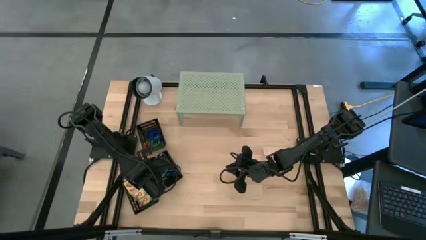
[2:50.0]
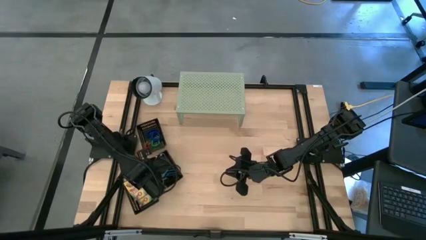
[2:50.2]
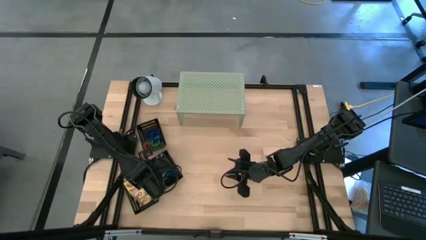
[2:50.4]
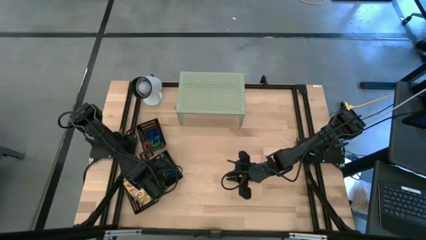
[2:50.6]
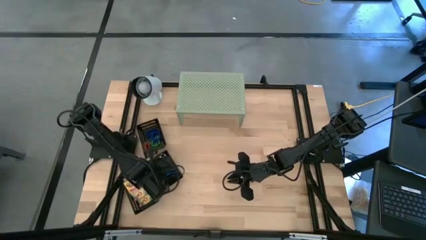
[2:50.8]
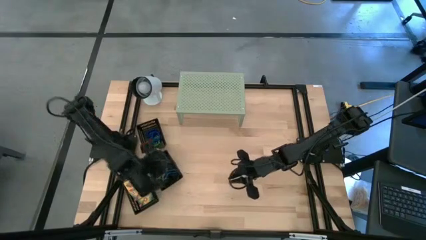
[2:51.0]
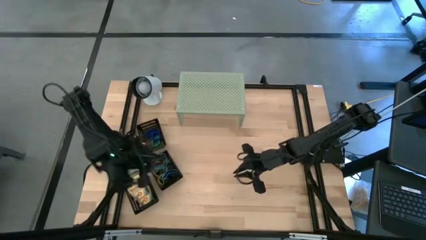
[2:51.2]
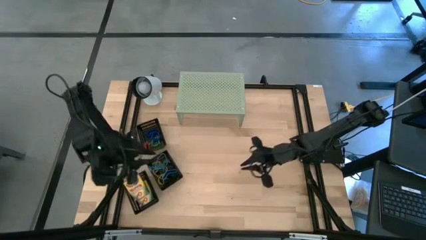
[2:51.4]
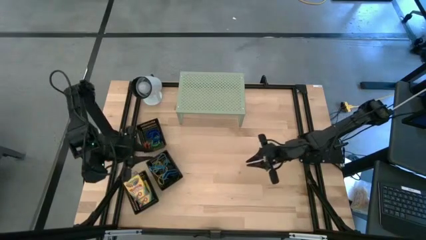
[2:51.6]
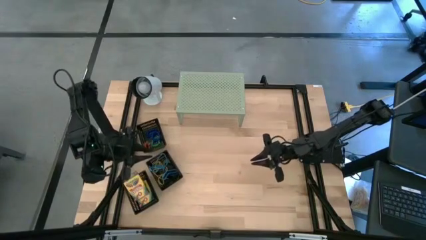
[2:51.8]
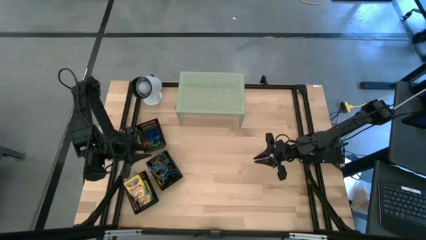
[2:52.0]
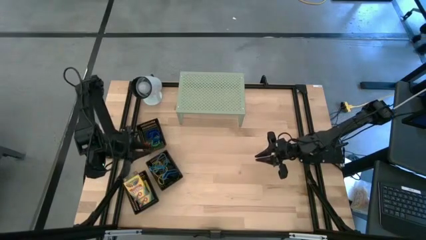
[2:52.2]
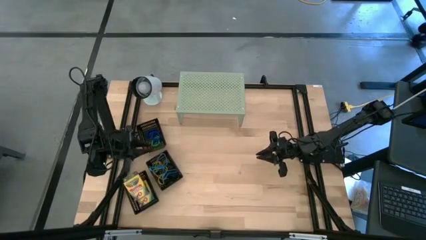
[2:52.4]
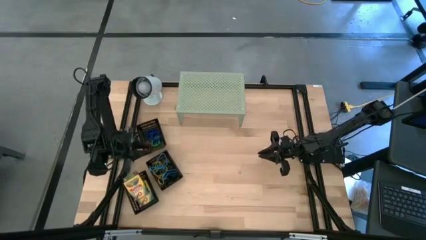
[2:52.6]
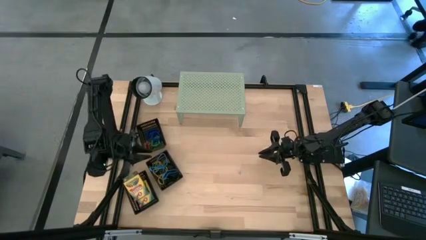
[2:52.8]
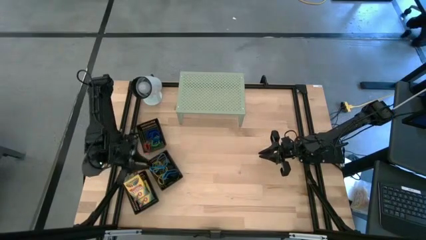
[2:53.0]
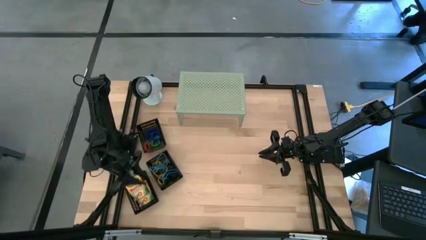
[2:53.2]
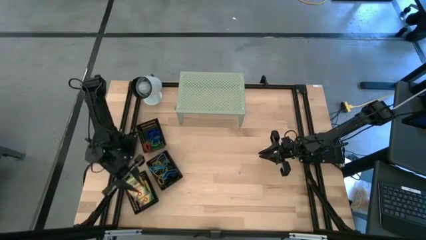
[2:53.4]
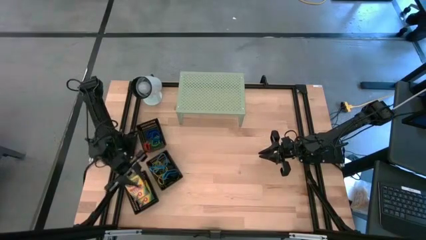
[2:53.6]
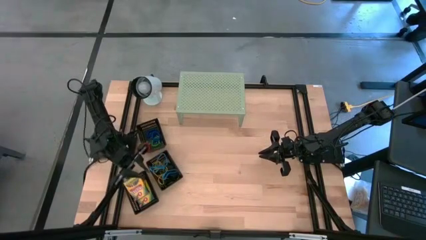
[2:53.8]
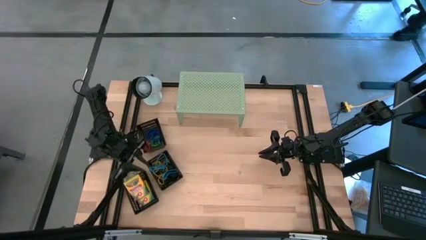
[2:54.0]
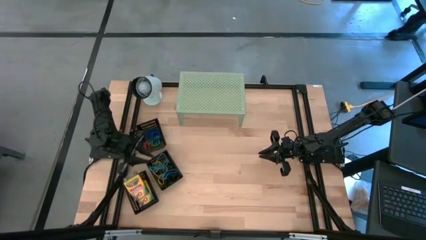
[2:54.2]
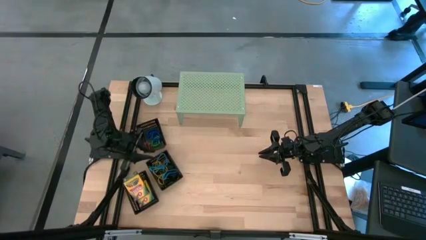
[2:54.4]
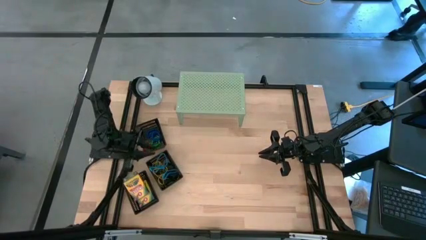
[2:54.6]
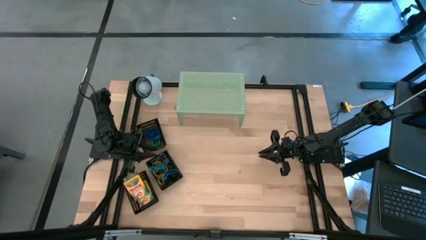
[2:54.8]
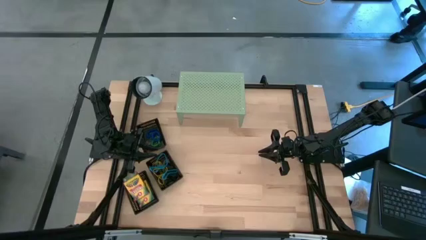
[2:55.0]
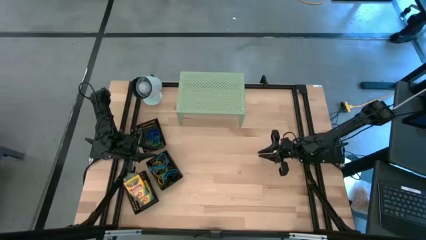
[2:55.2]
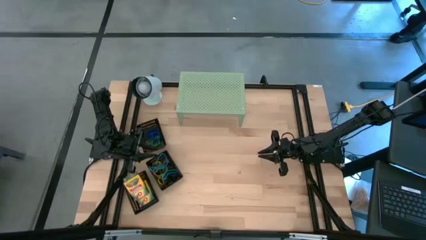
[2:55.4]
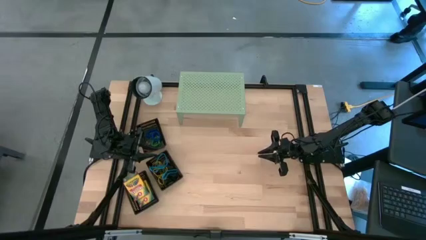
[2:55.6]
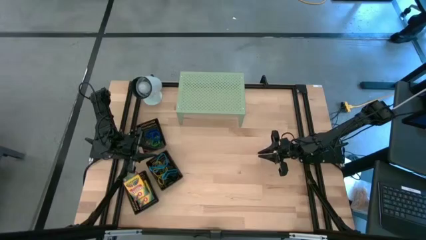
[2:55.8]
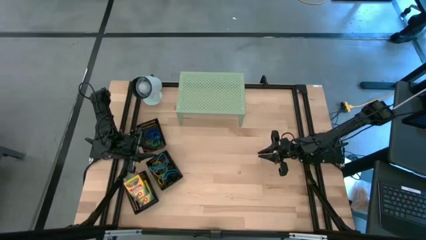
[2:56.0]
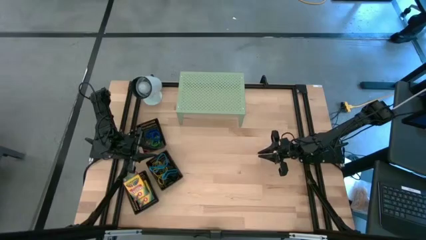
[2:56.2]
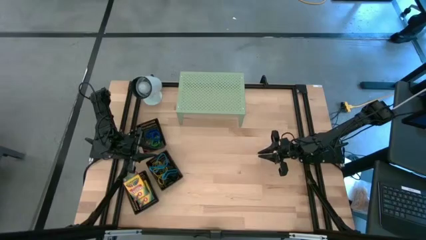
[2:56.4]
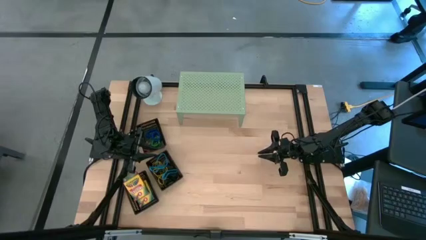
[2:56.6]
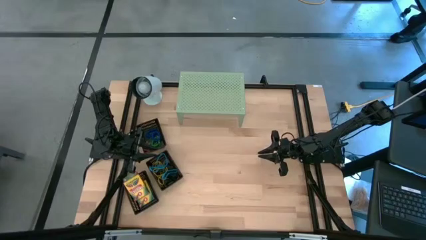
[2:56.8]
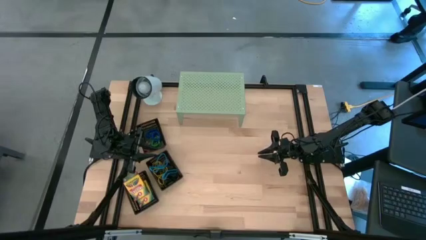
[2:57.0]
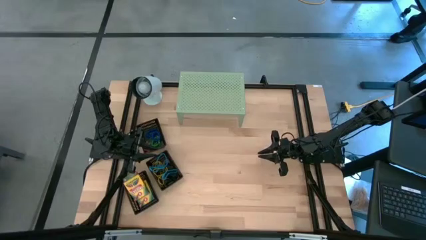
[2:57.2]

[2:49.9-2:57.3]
Task: Pick & Place Office Desk Supplies
Return to Home Position

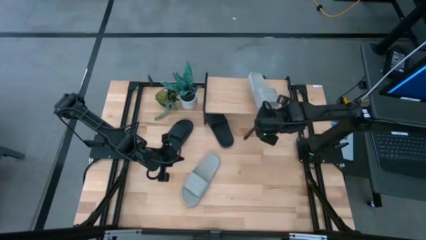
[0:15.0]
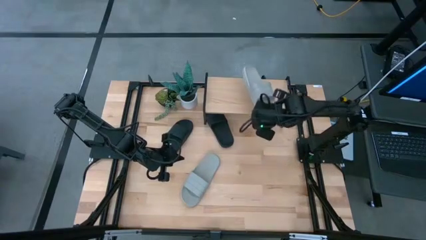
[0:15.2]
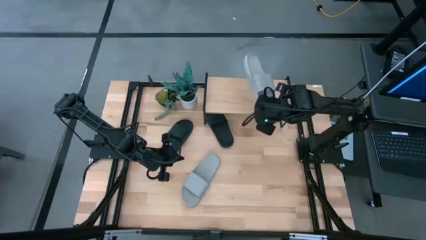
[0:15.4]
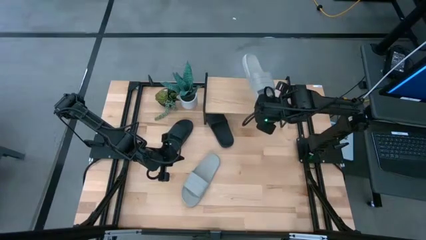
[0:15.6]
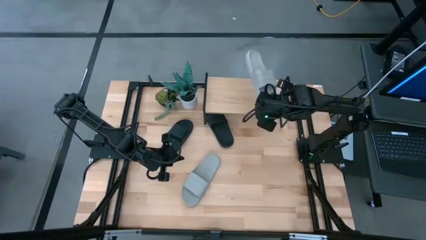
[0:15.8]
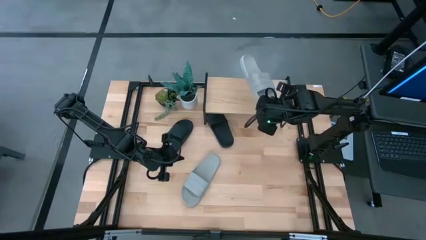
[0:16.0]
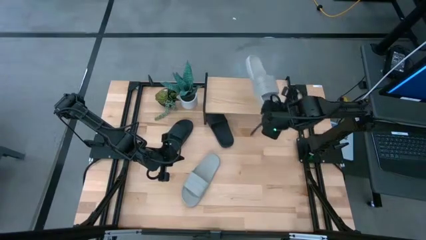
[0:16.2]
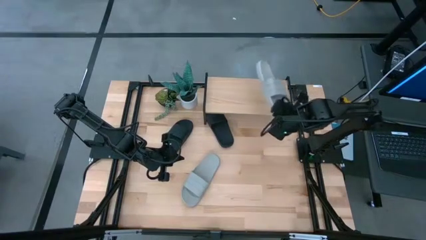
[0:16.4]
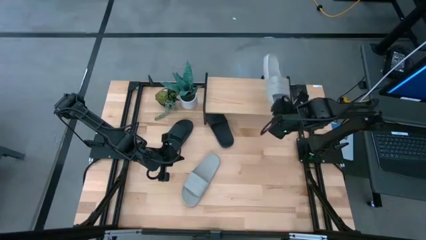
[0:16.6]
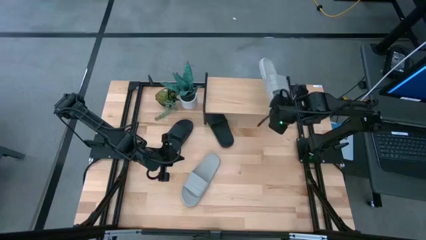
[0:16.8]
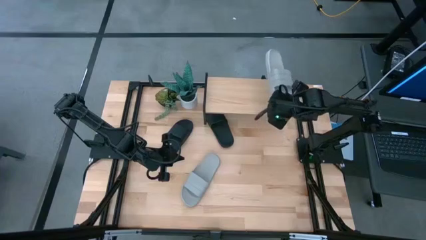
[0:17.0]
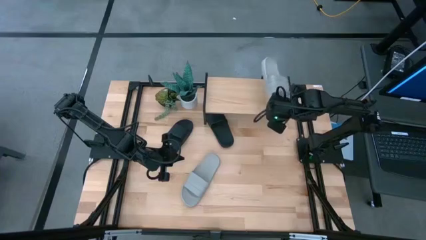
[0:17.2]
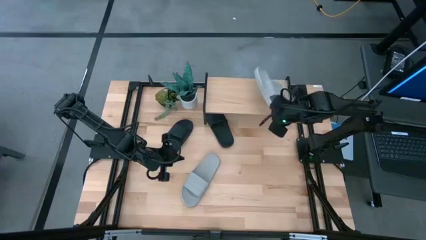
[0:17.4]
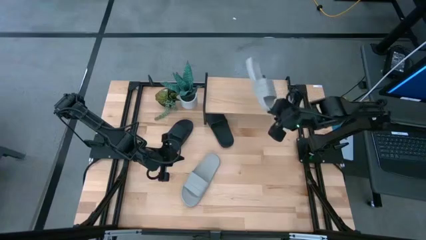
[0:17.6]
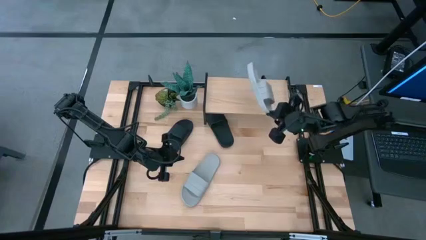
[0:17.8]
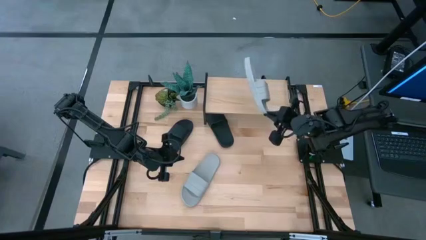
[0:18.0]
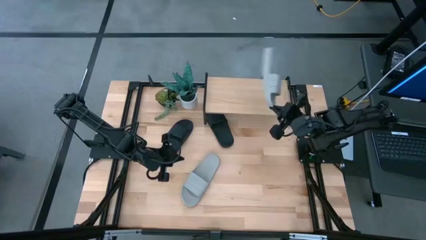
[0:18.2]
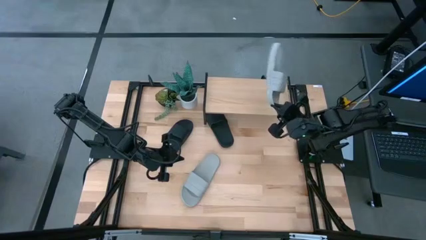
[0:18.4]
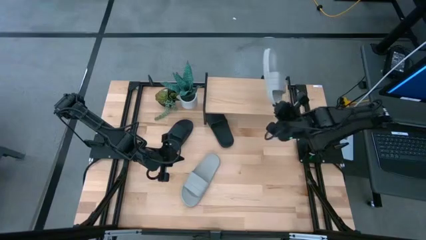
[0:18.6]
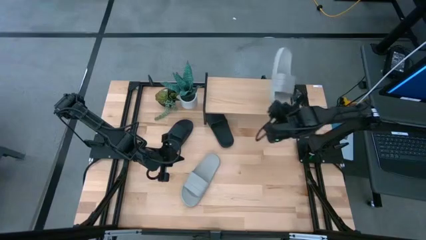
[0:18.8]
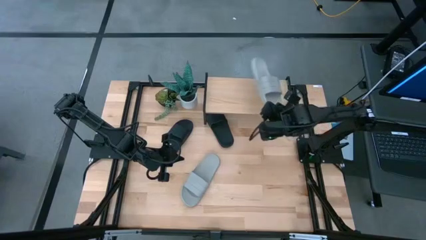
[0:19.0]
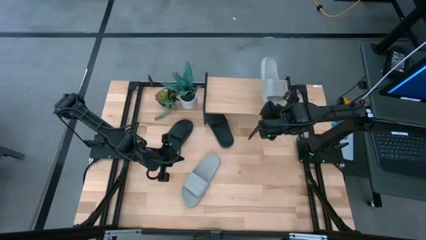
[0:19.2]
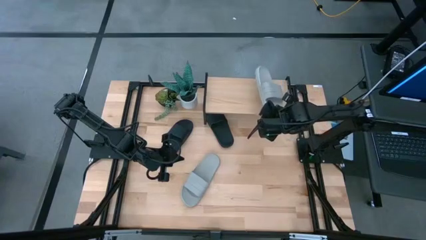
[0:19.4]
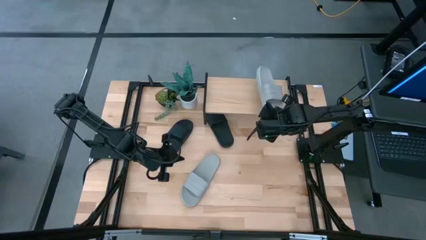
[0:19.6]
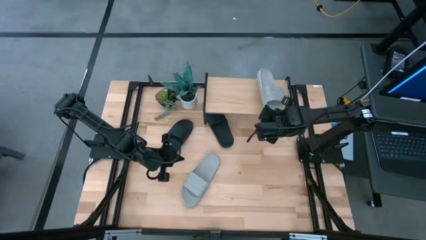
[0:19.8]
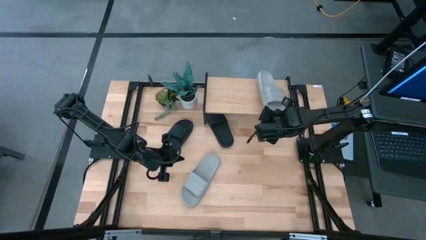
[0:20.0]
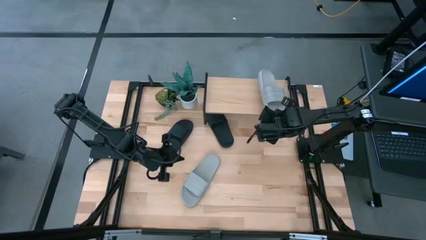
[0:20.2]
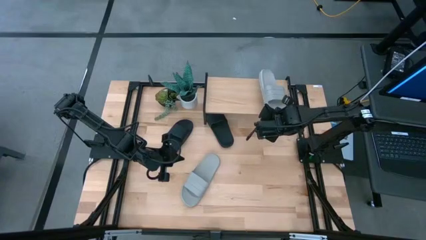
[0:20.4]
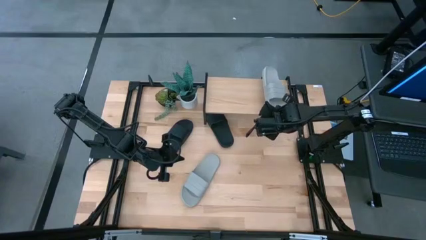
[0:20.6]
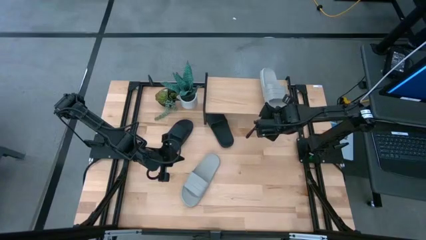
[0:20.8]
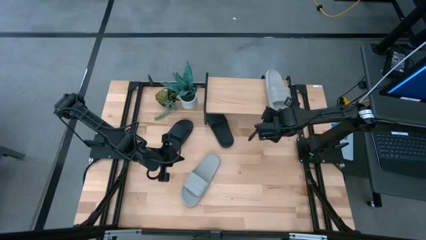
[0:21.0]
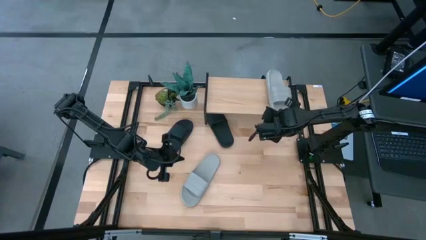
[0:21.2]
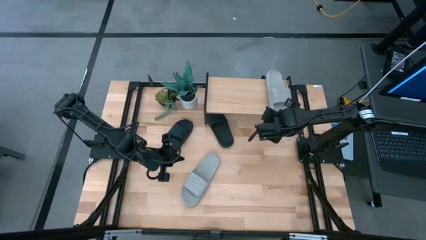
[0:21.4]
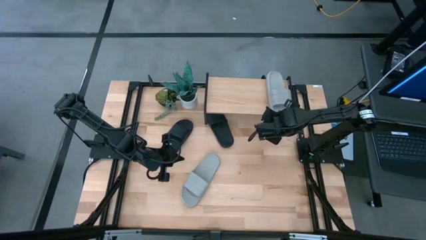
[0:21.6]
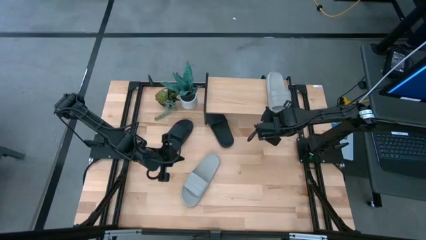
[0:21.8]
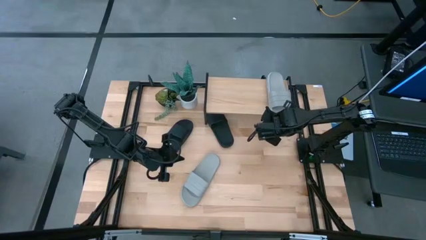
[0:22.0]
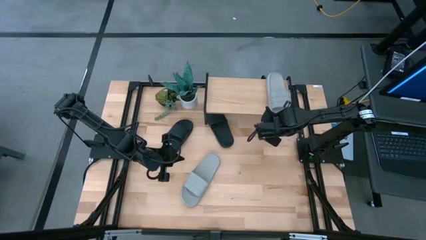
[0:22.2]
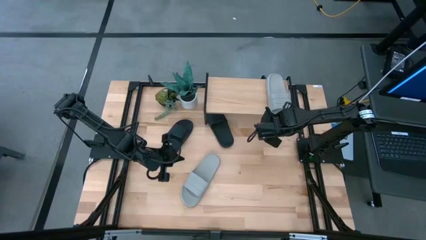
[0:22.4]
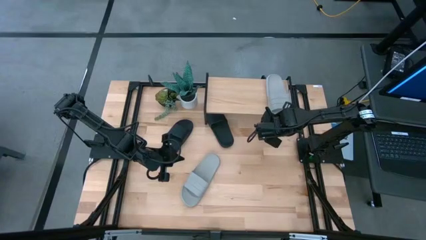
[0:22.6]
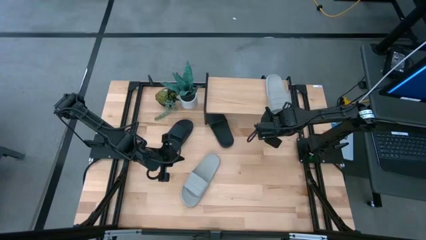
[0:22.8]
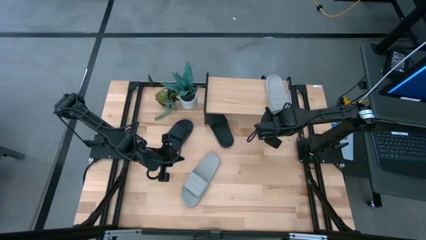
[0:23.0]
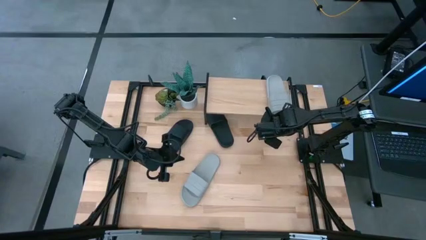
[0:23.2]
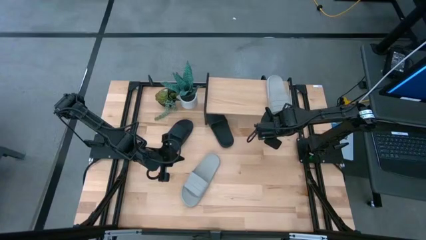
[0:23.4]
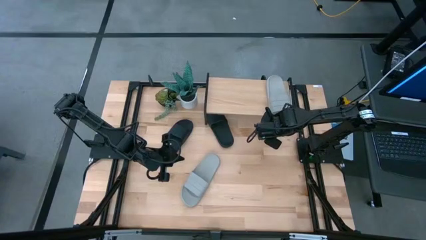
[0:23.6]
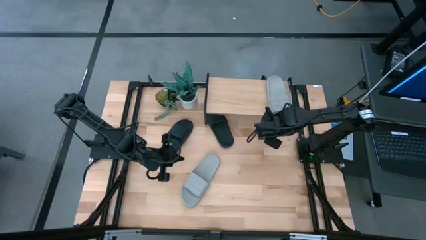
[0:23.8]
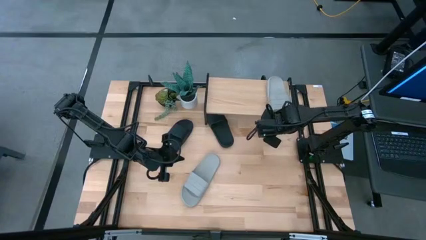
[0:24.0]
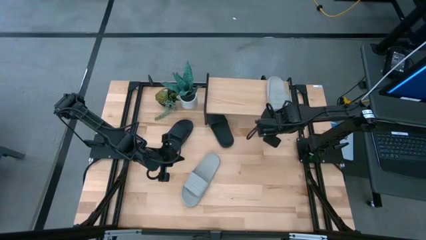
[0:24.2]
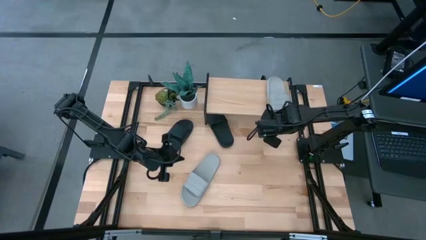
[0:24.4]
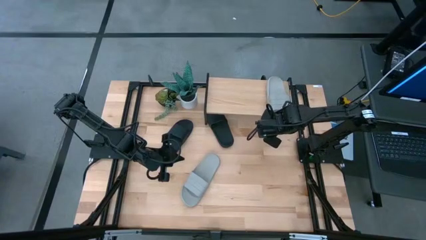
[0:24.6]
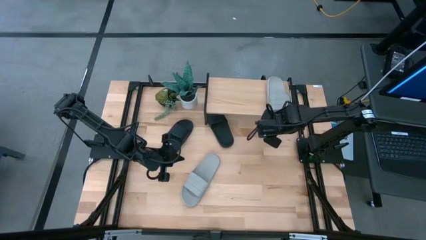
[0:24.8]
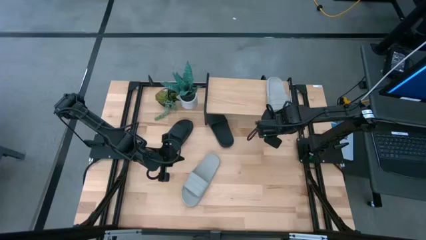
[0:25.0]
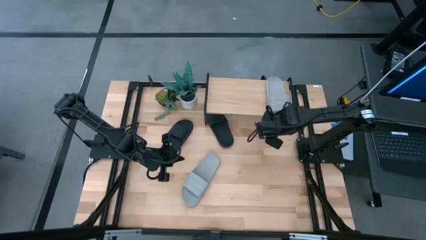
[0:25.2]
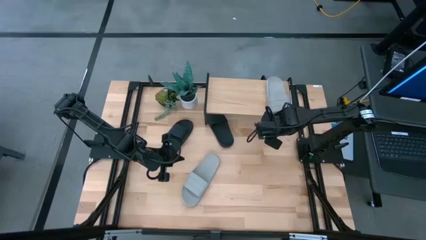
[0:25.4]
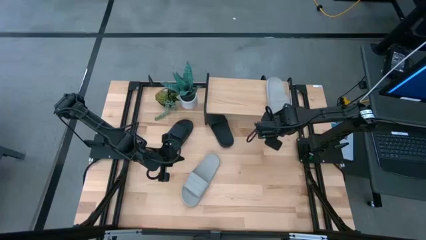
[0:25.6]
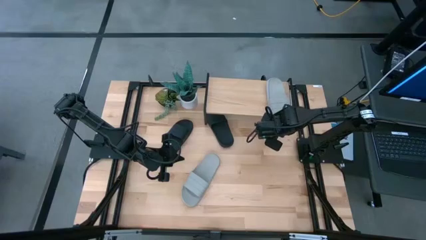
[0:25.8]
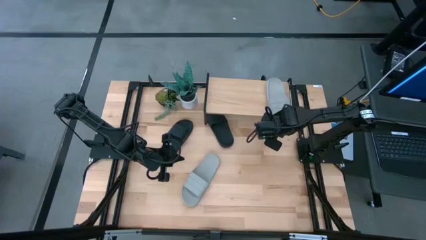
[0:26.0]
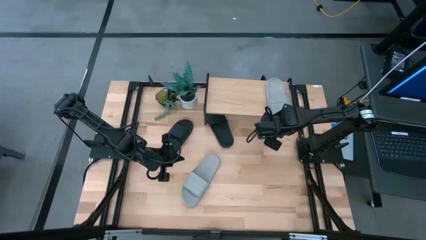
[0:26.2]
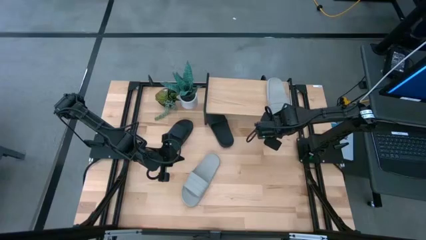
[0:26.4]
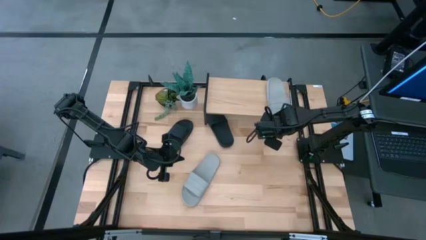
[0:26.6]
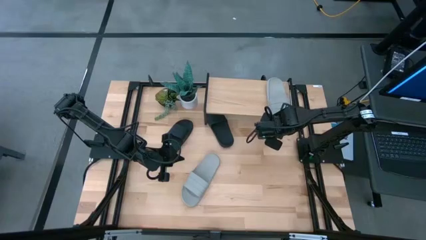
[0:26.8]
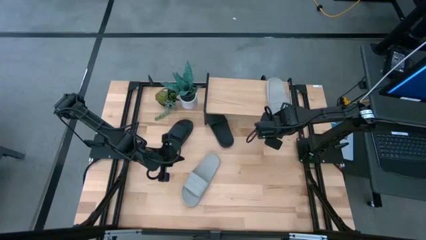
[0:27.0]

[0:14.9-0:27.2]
Task: Pick and place slides into the shelf
Put the top gray slipper on the shelf
